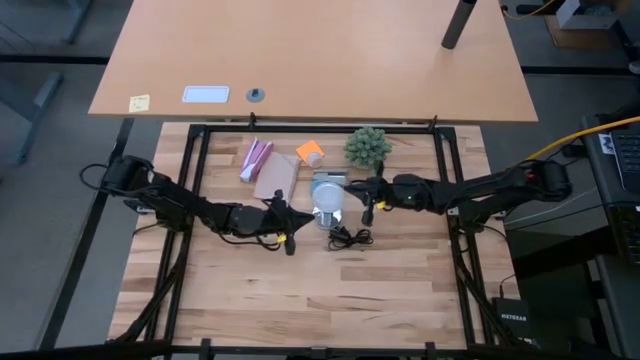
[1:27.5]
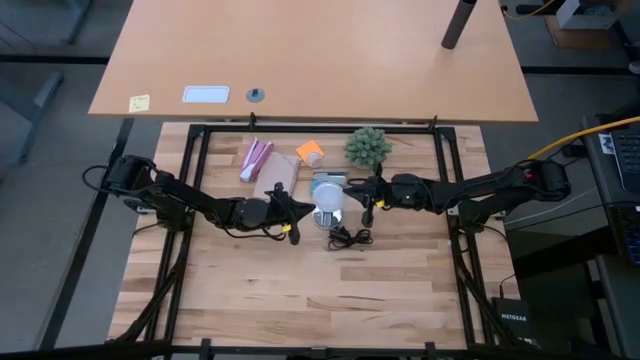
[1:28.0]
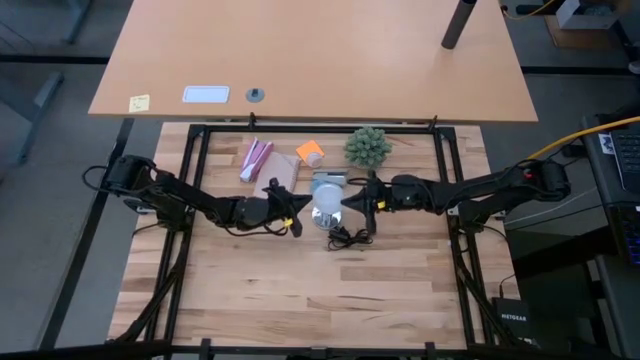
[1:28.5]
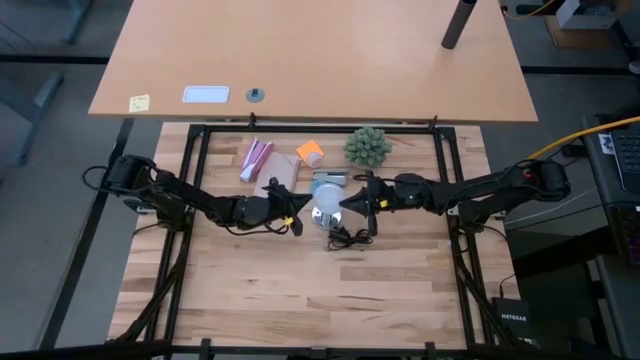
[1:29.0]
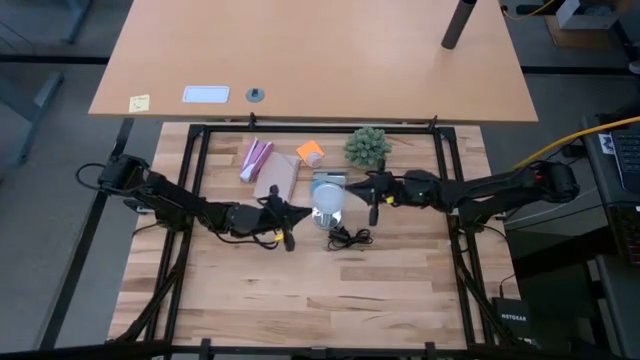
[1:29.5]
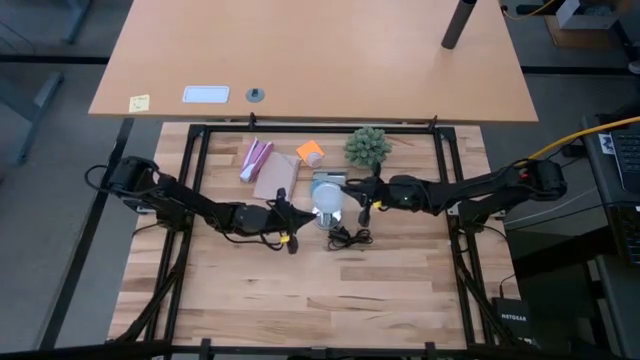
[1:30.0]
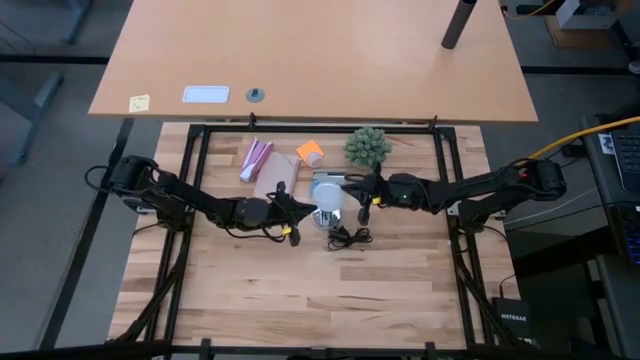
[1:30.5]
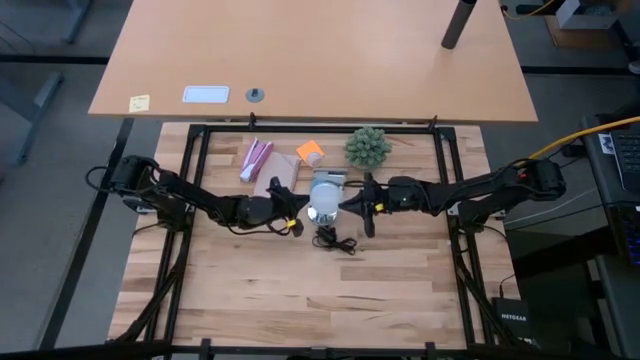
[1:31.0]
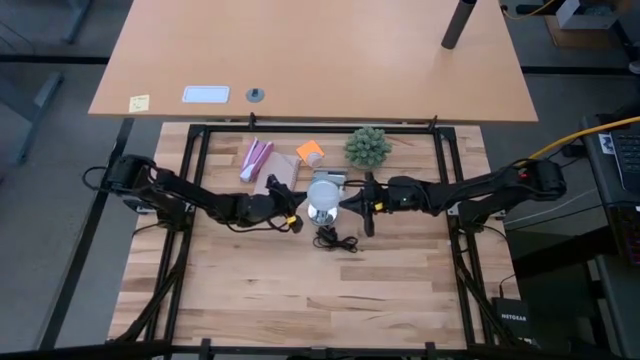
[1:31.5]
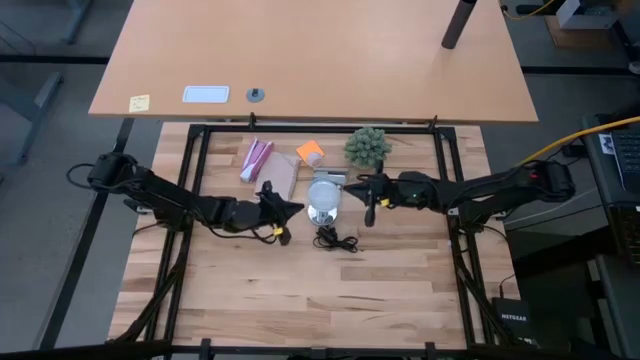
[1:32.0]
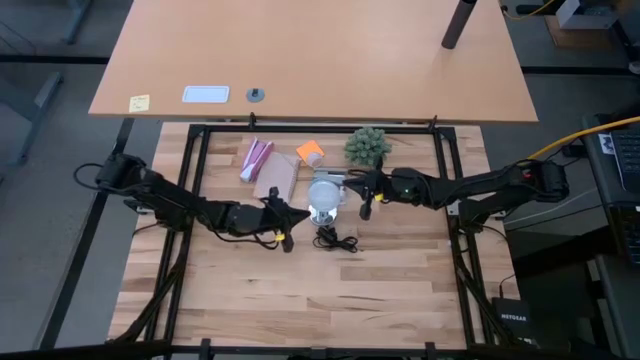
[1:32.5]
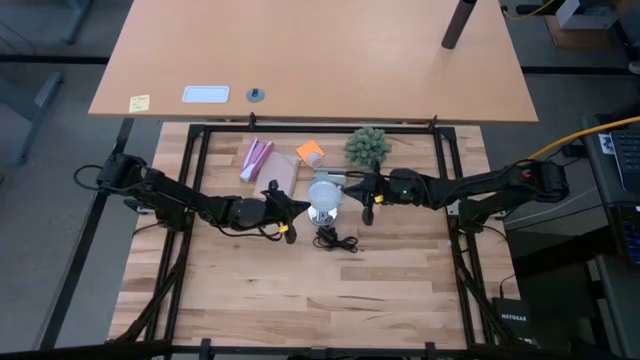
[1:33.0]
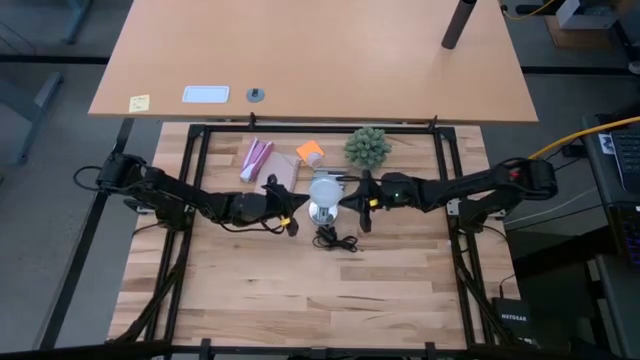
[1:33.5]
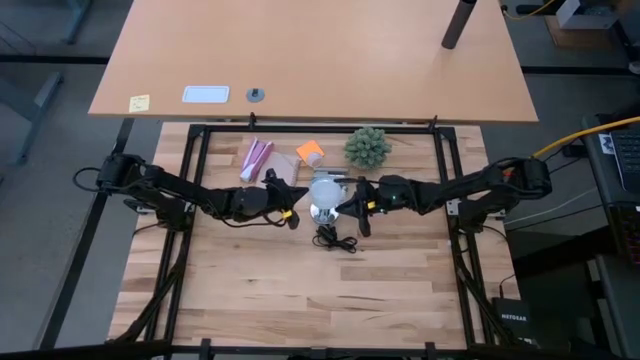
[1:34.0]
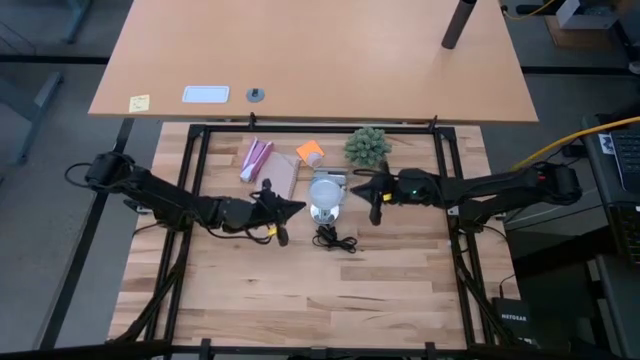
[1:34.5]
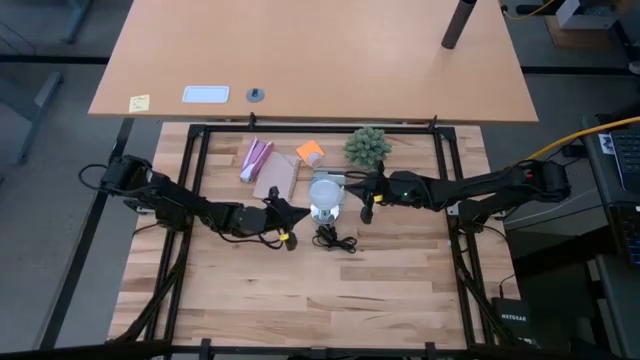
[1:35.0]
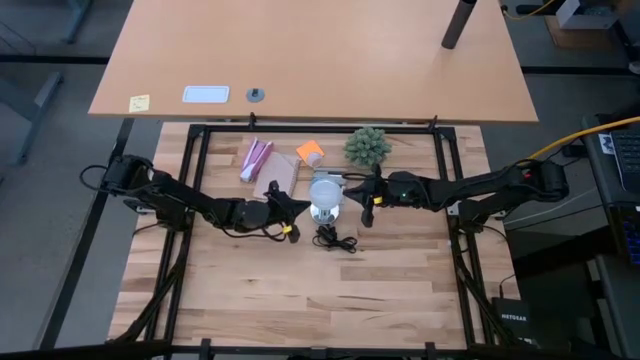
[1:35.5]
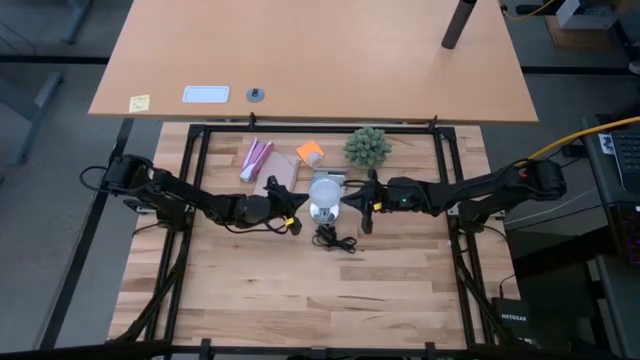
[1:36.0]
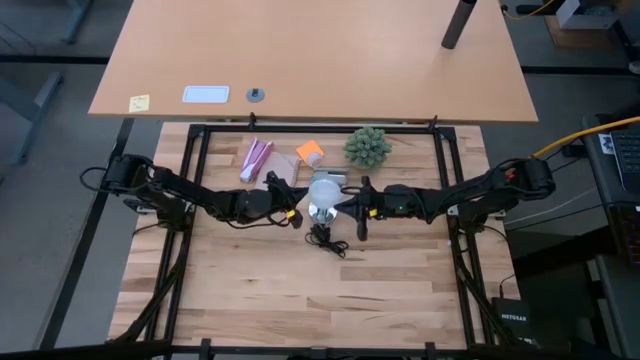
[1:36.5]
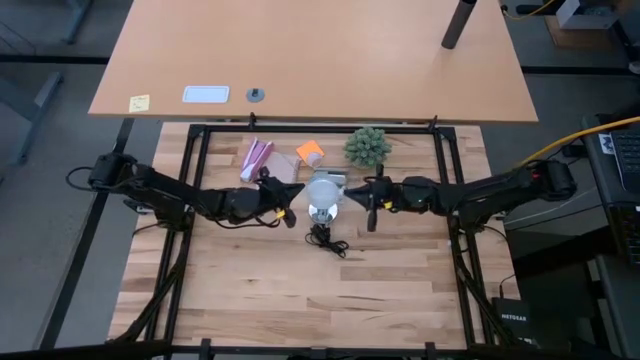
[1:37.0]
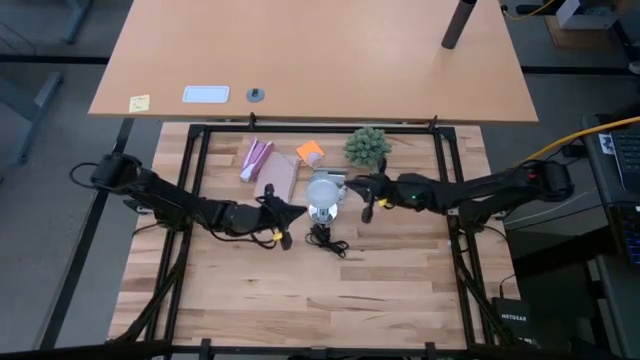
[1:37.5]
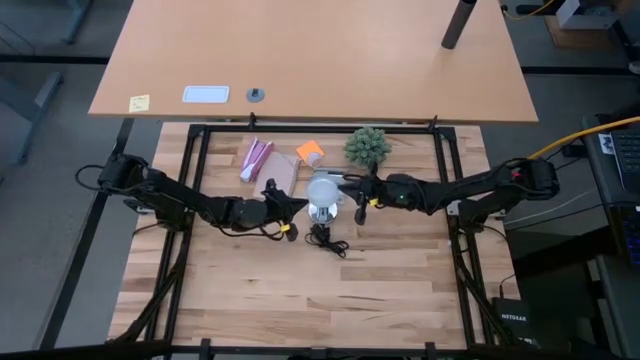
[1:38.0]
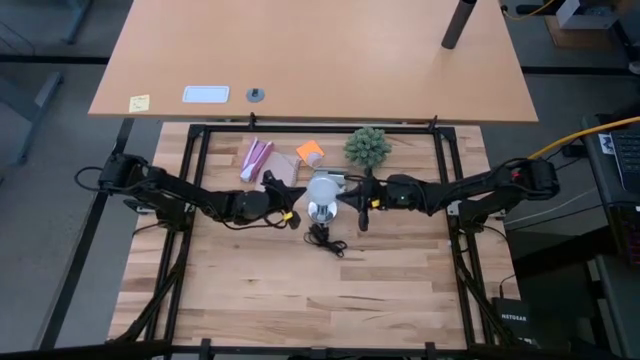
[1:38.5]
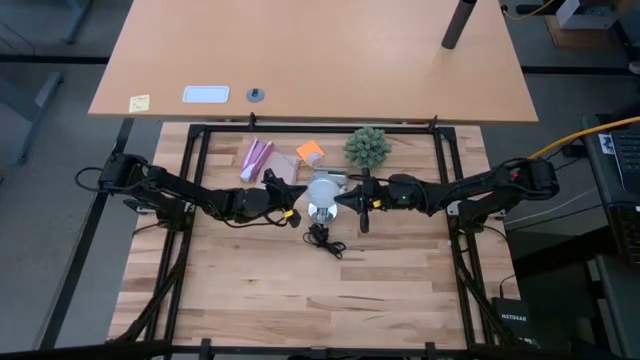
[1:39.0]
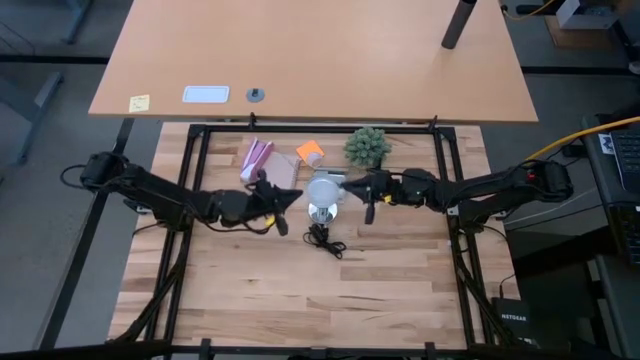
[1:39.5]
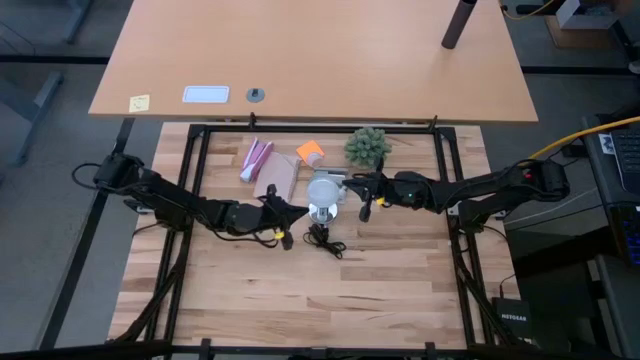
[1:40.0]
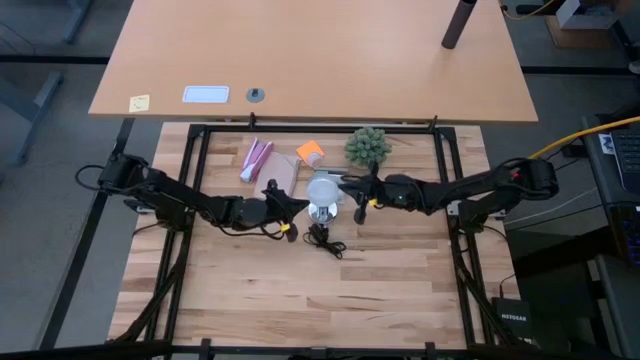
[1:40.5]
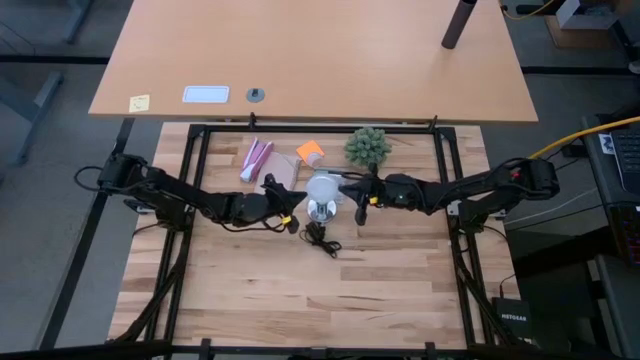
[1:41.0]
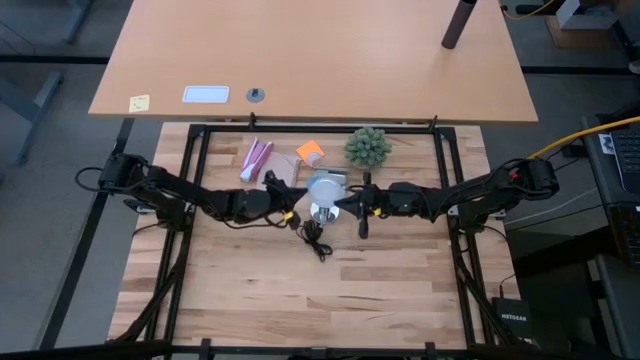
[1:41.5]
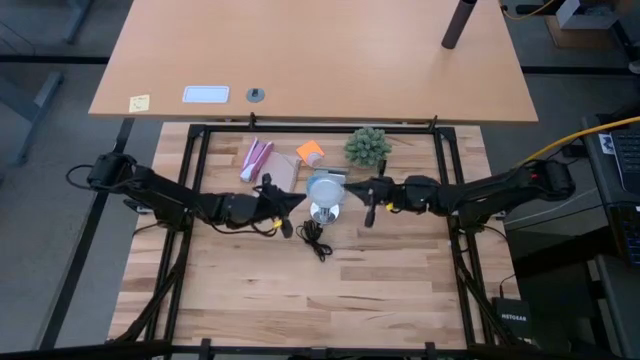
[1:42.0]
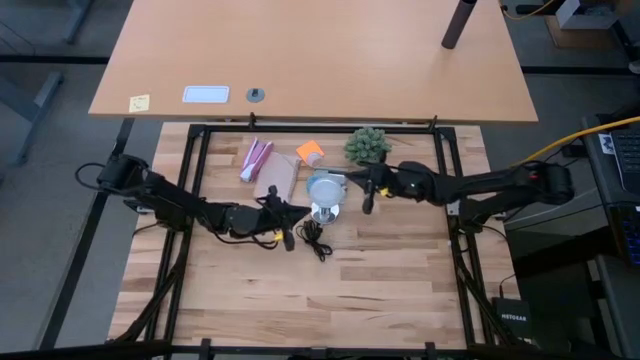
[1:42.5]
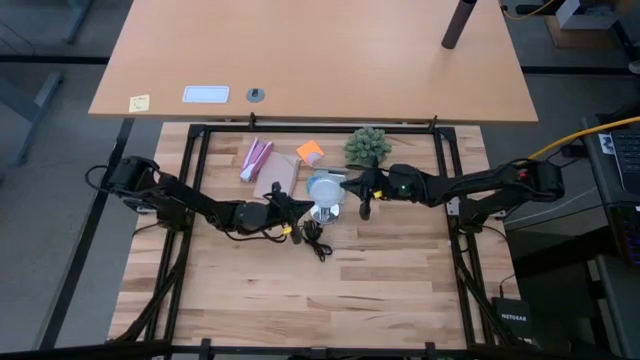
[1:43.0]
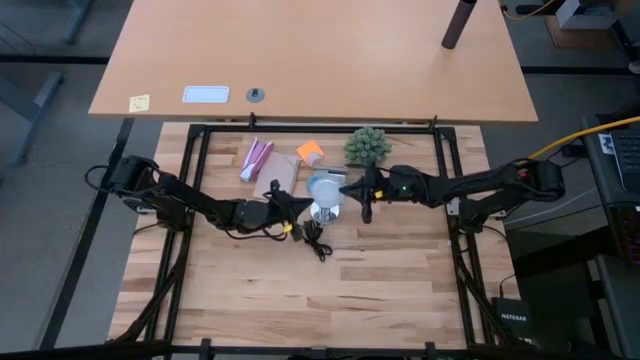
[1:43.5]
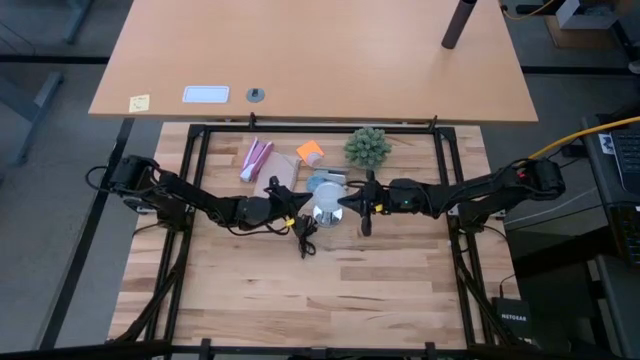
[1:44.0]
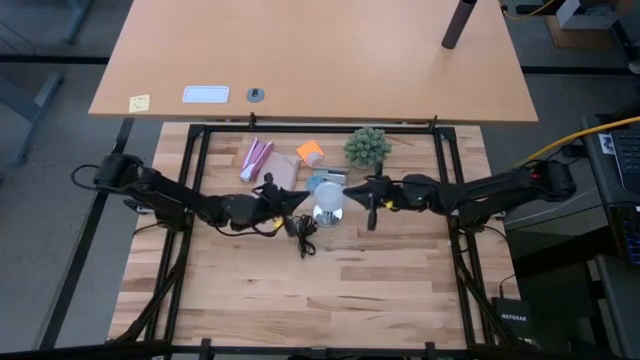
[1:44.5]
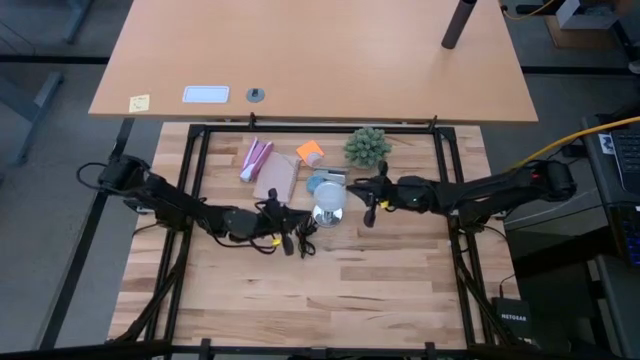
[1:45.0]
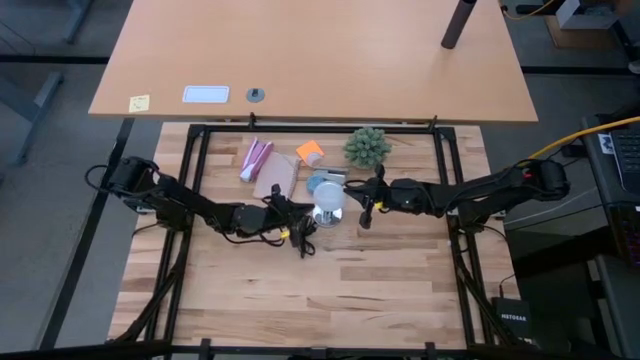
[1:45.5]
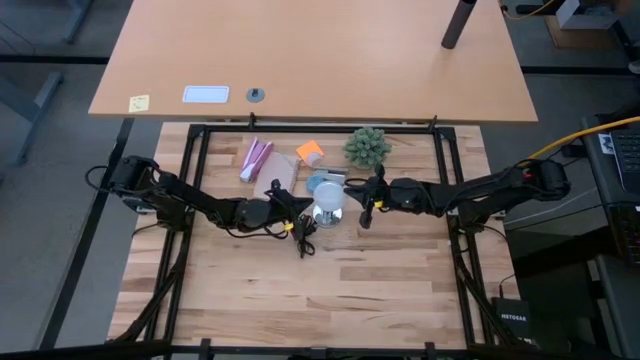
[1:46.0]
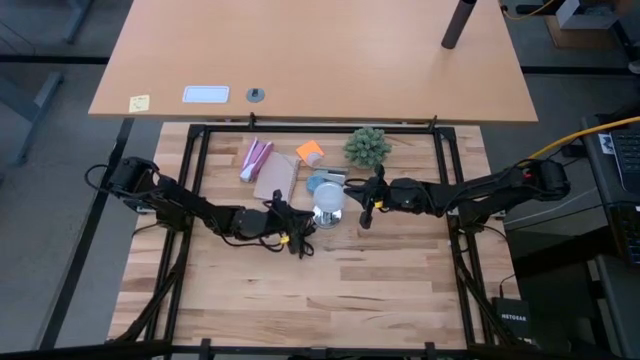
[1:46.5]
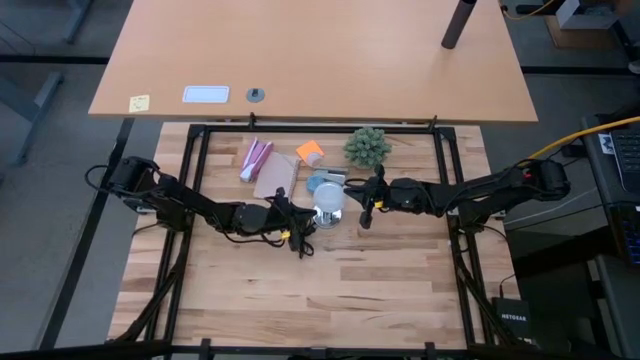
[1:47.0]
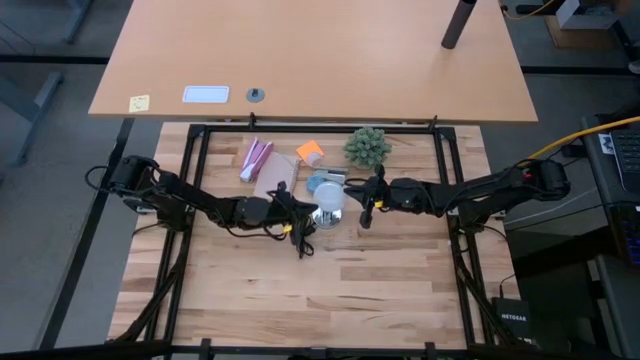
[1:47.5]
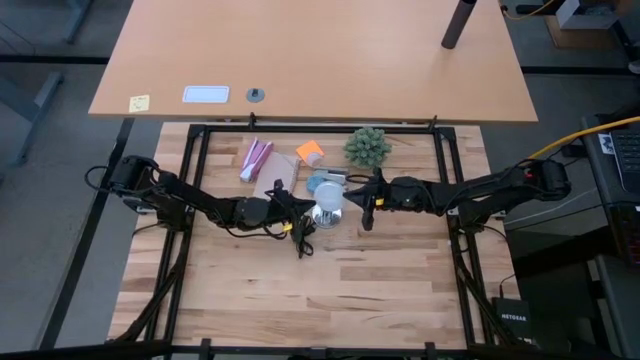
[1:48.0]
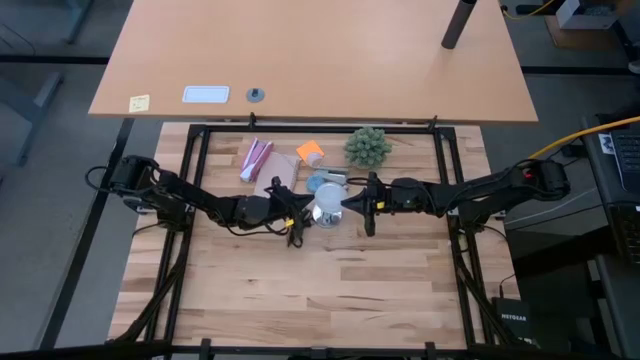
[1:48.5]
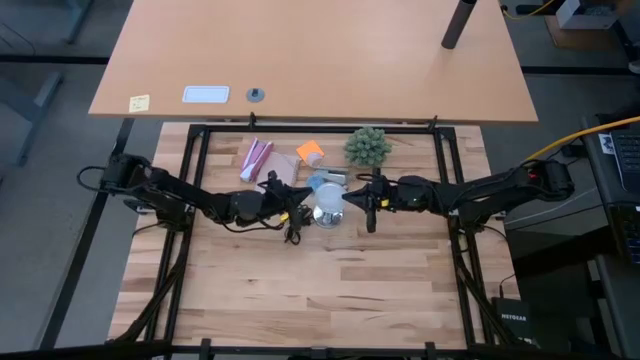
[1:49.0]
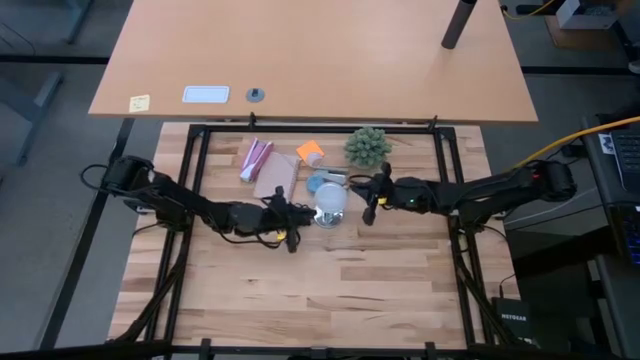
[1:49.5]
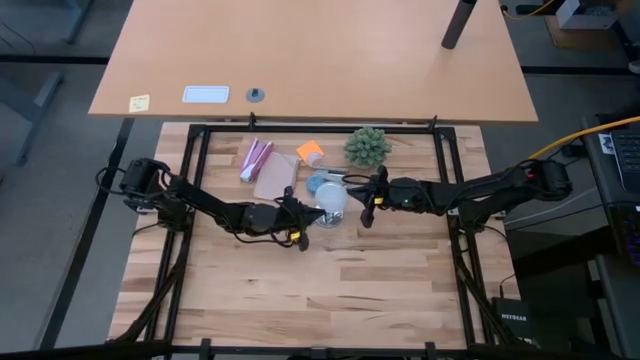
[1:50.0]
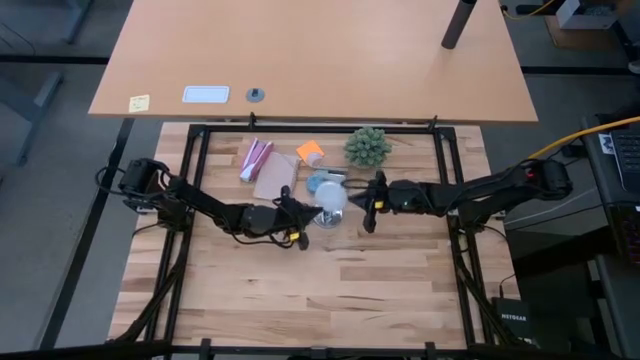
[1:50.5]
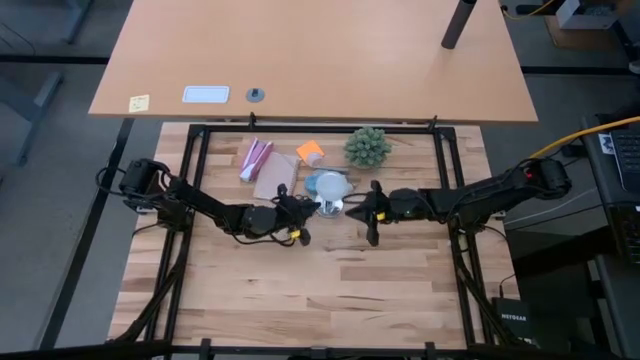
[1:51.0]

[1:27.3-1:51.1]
Task: Screw lightbulb
Insert the lightbulb into the silver lamp socket
